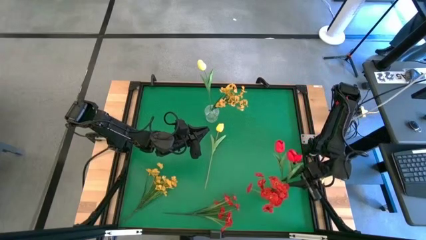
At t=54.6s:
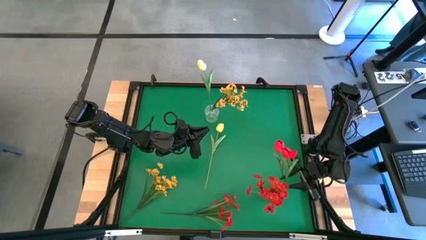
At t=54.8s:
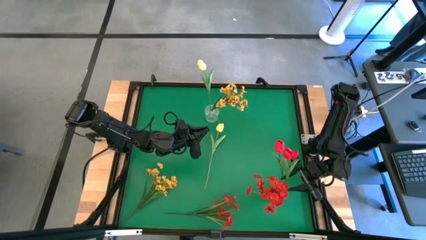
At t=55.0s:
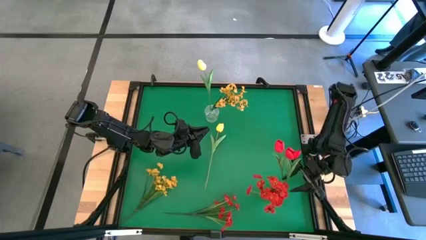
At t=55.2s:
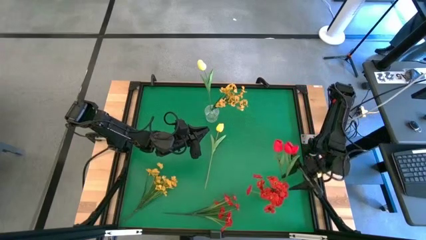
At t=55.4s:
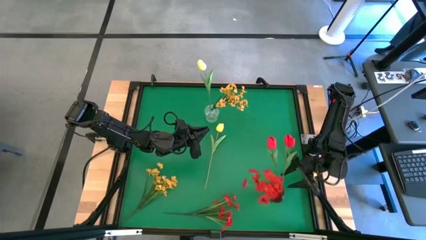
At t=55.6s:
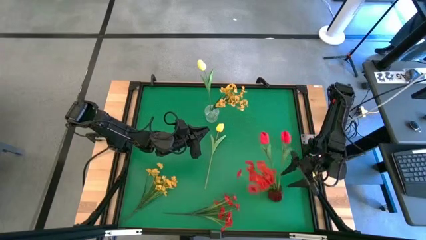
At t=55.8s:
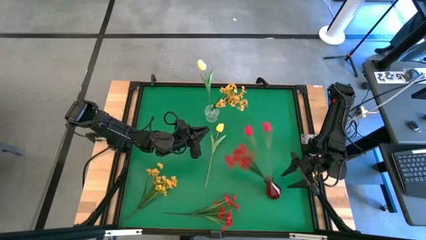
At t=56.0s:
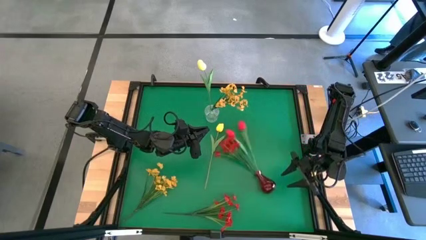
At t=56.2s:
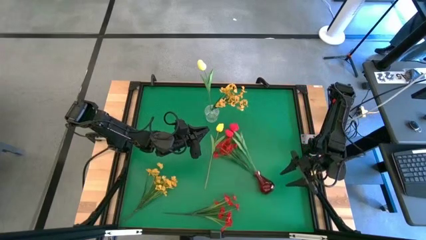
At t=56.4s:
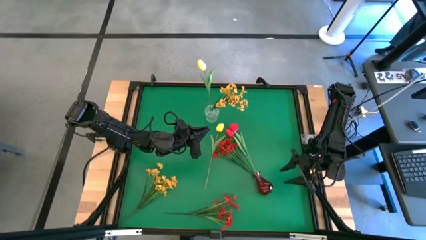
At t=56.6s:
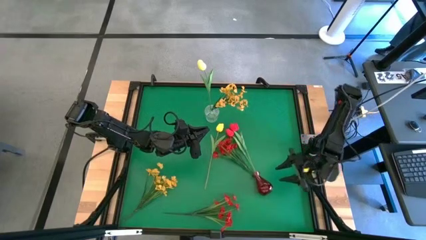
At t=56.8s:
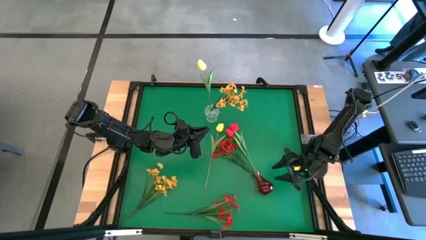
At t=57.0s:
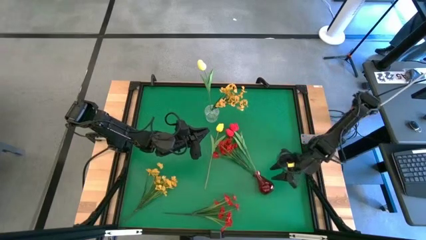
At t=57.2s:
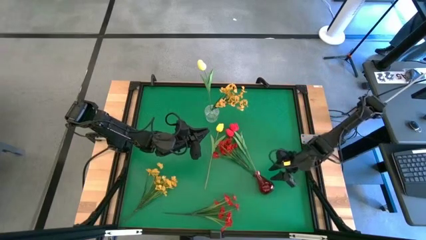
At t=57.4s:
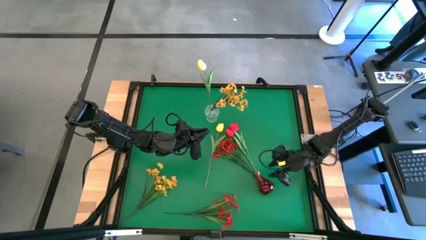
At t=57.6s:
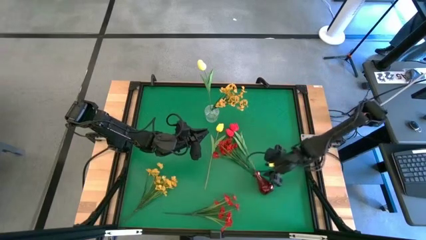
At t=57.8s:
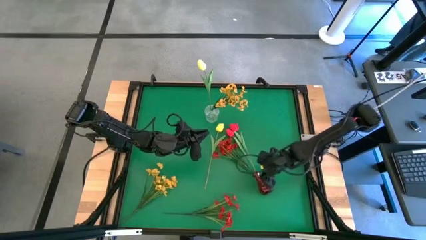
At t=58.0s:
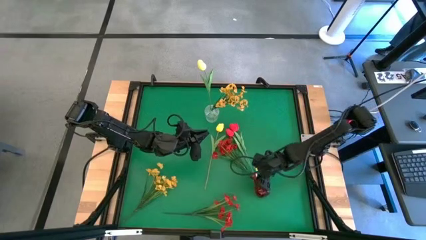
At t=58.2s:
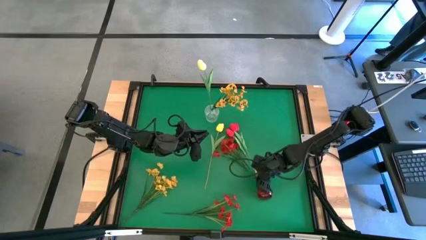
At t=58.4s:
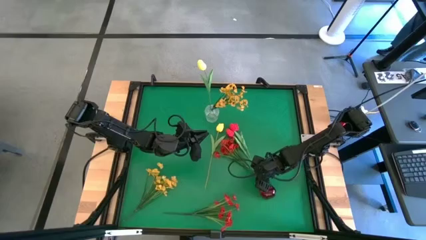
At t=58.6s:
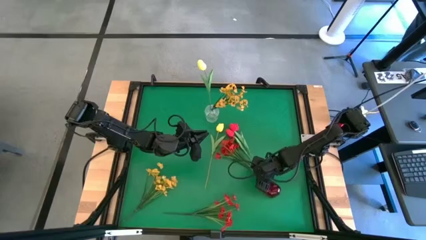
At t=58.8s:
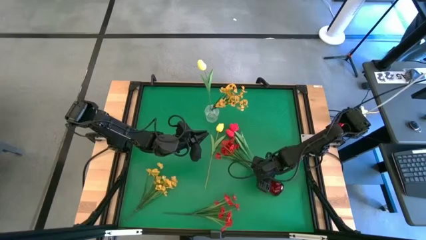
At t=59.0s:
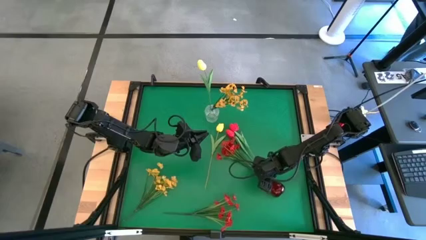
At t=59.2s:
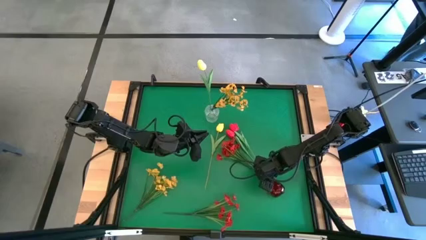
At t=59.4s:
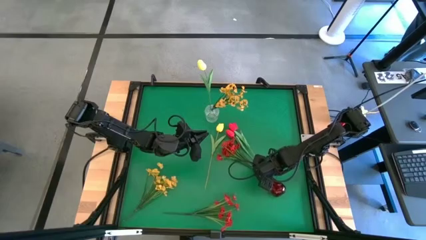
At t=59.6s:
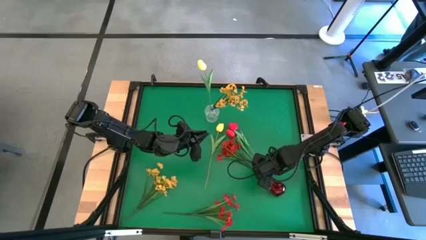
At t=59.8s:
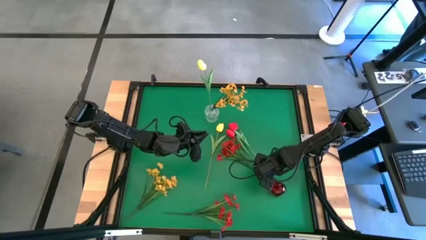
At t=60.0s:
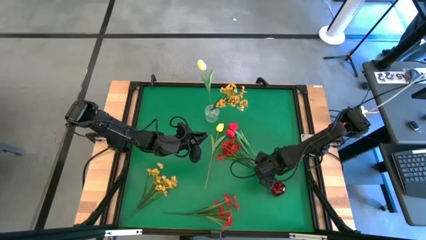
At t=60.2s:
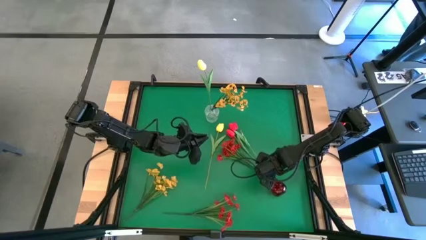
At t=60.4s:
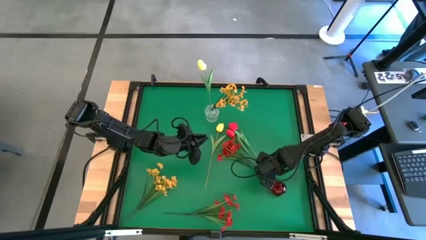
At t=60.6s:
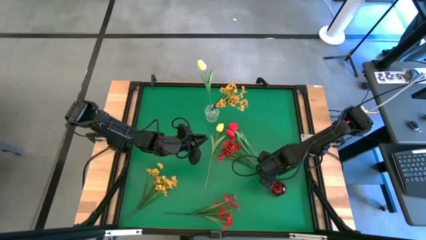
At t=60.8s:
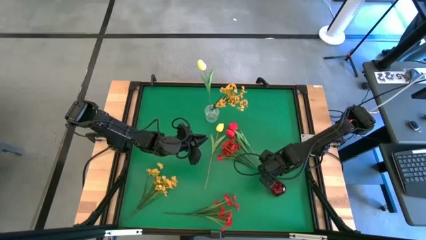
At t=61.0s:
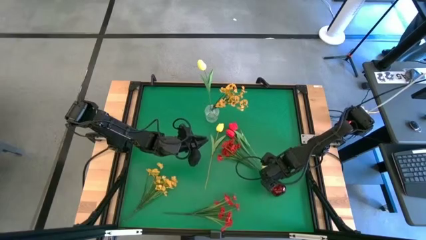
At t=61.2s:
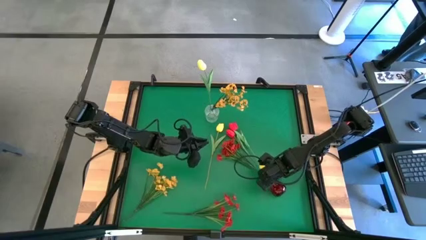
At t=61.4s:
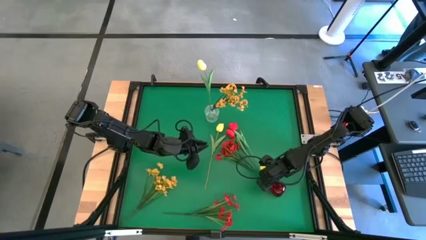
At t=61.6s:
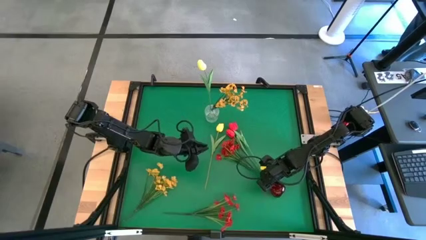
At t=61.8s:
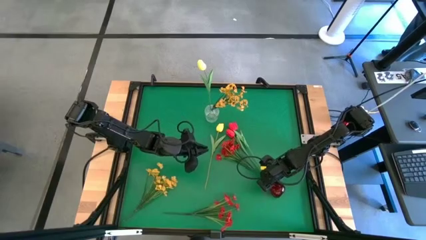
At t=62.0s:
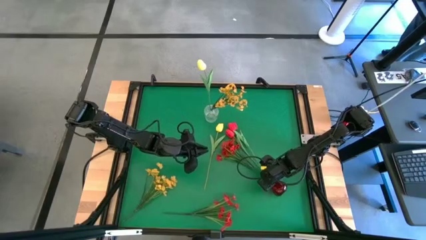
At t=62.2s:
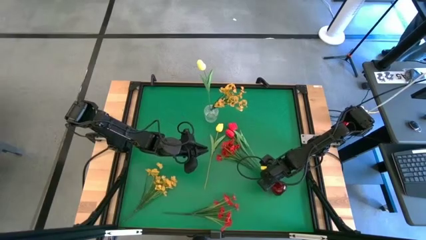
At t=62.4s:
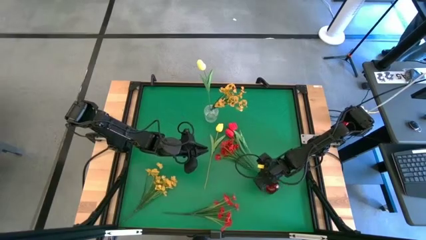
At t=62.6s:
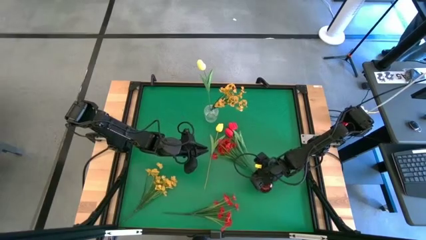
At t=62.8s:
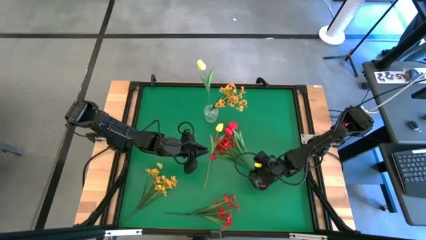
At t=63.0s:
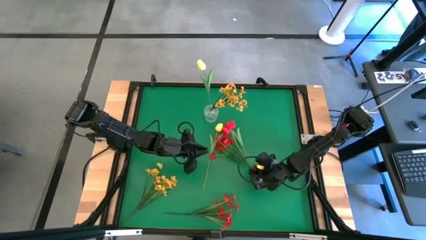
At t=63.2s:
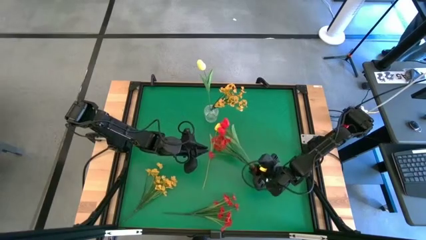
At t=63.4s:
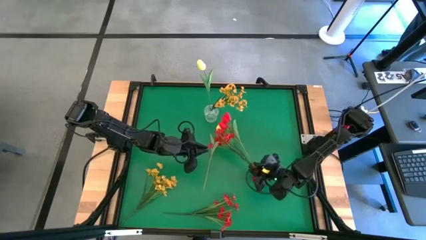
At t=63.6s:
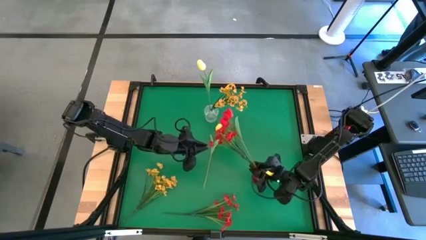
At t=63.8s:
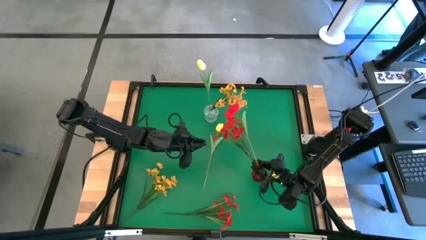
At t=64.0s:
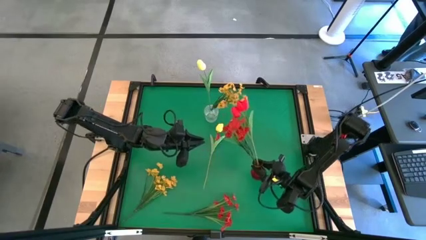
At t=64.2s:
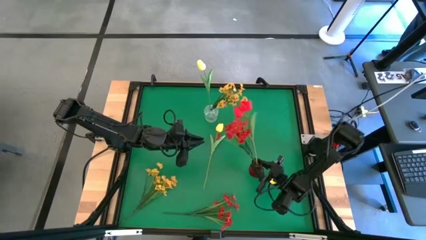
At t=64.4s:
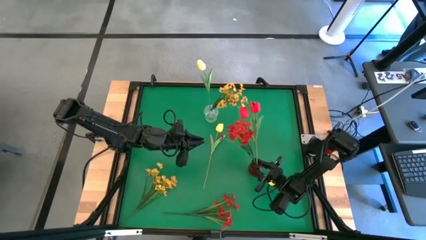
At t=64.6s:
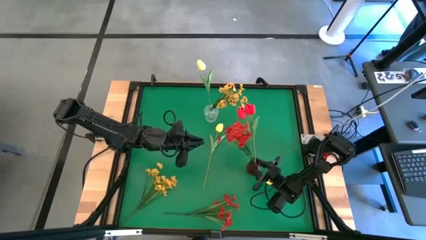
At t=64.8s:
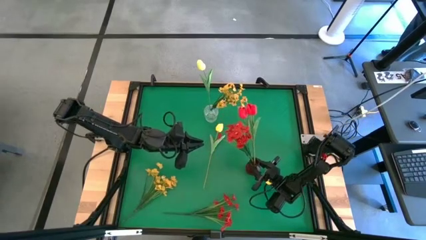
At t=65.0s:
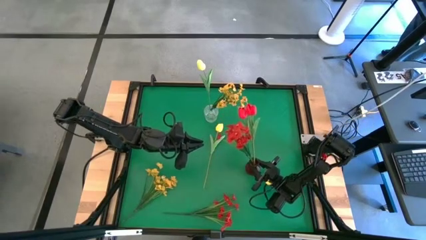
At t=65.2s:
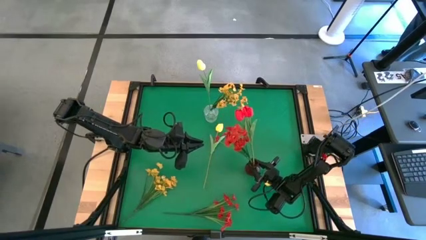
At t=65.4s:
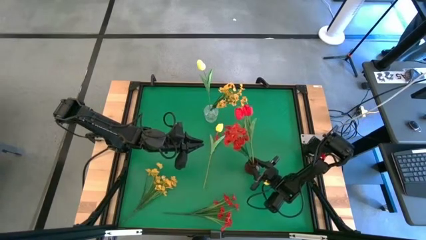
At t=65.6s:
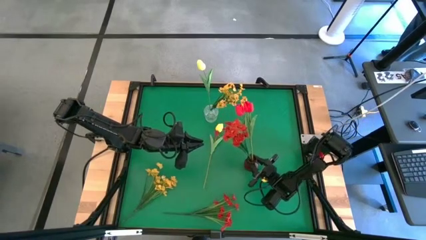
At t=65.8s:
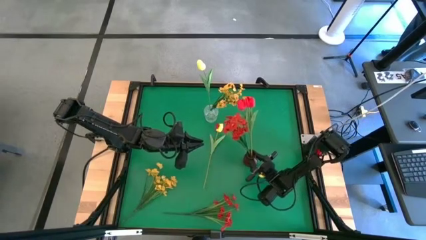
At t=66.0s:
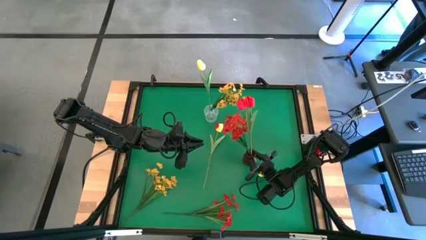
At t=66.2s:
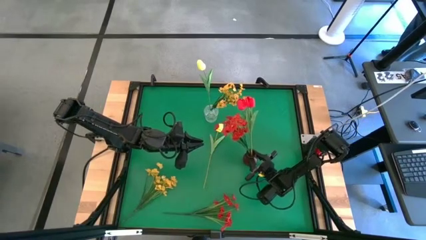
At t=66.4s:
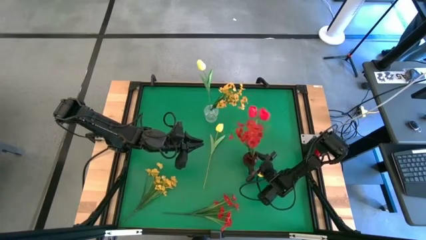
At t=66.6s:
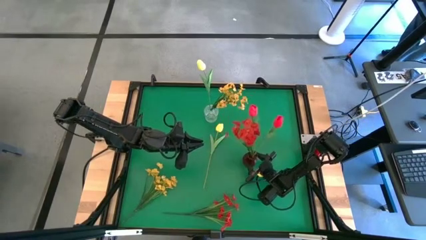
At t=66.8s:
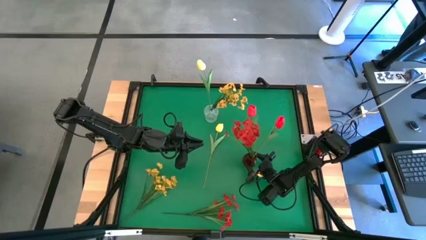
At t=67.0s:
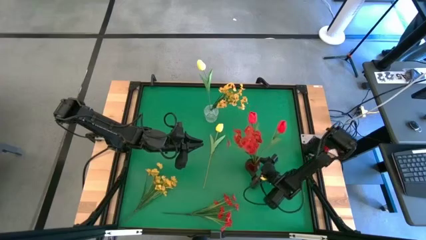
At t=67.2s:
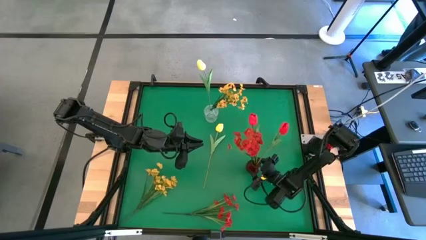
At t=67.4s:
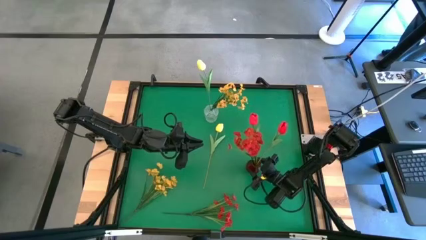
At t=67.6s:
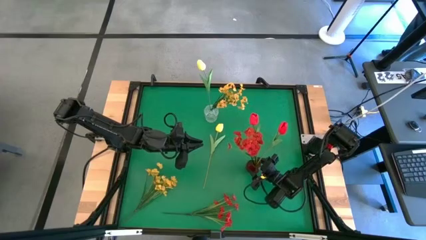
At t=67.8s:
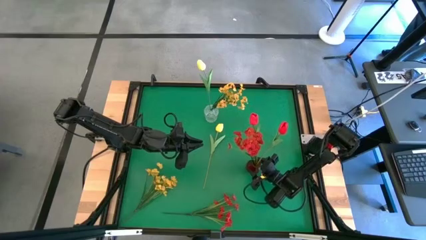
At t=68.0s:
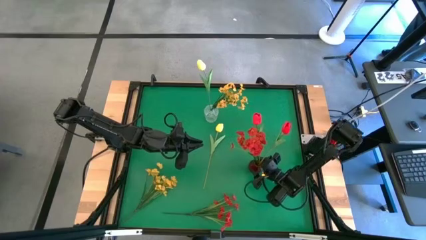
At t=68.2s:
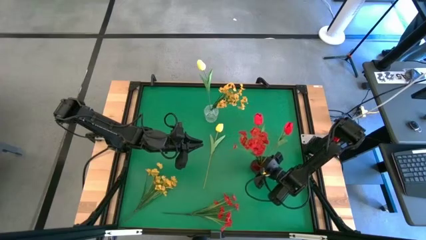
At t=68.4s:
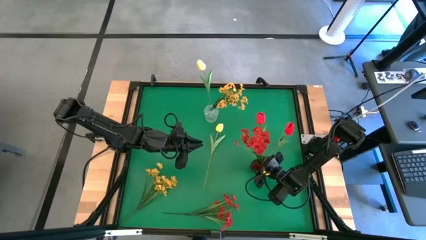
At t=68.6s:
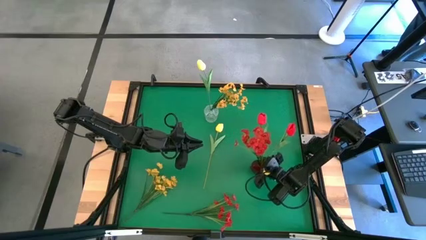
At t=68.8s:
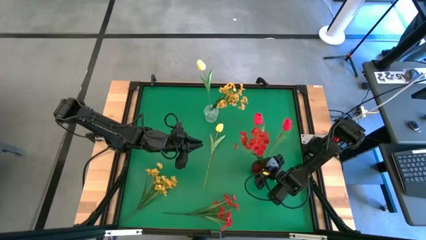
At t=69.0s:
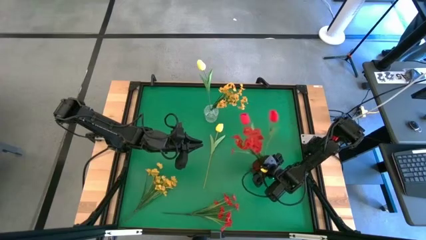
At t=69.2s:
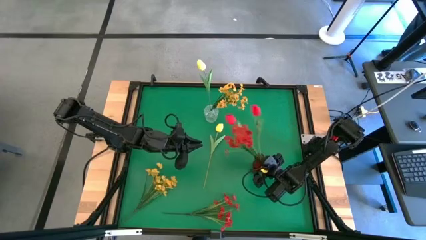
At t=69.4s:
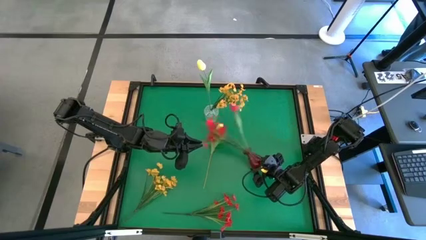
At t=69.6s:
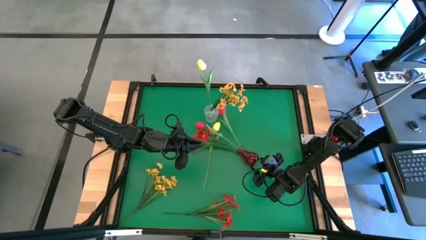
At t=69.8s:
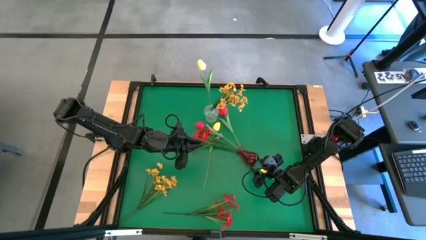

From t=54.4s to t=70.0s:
Task: Sort flowers into vase by color
Adjust the red vase
